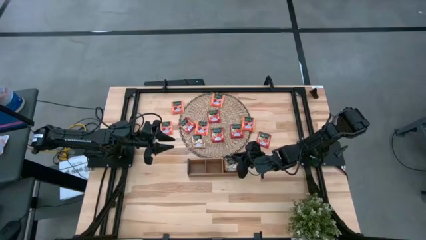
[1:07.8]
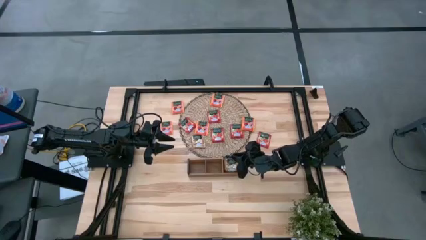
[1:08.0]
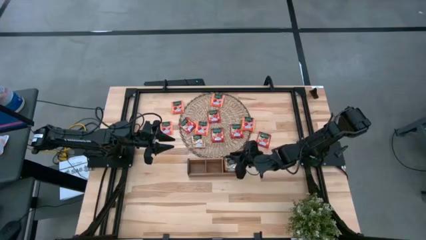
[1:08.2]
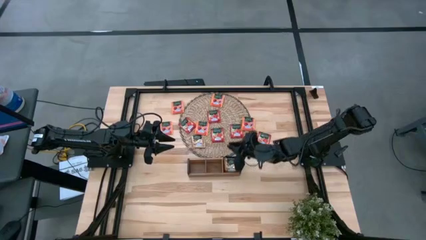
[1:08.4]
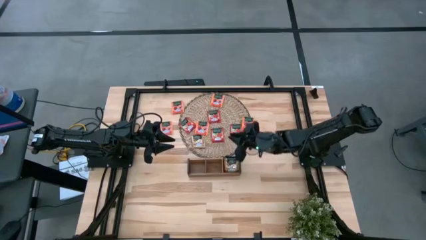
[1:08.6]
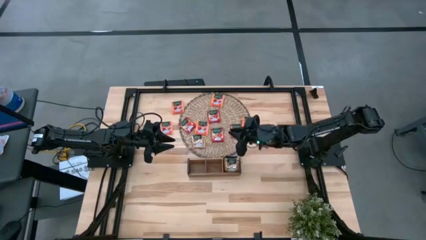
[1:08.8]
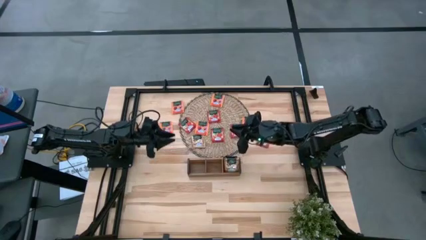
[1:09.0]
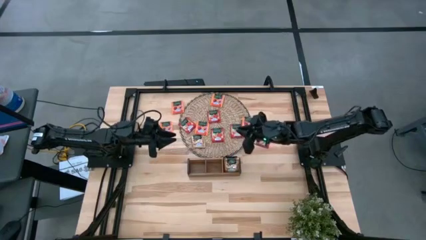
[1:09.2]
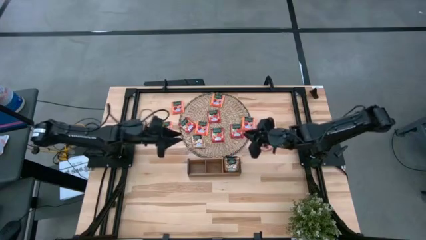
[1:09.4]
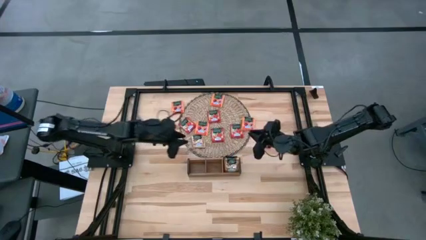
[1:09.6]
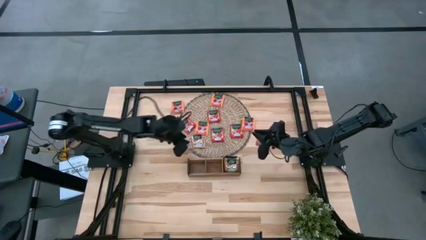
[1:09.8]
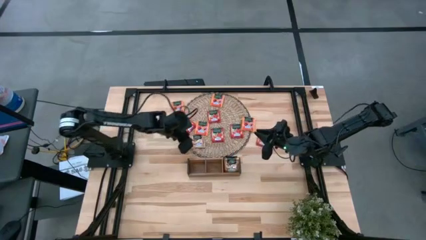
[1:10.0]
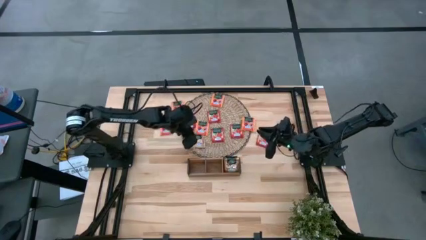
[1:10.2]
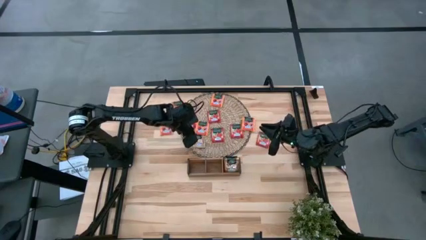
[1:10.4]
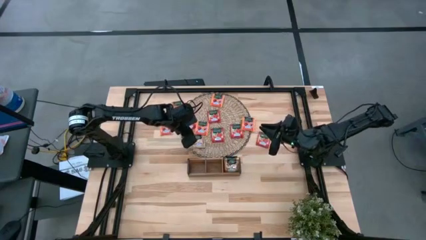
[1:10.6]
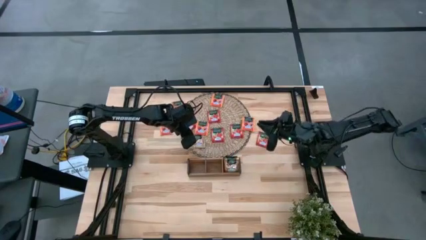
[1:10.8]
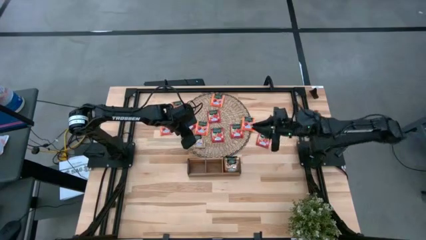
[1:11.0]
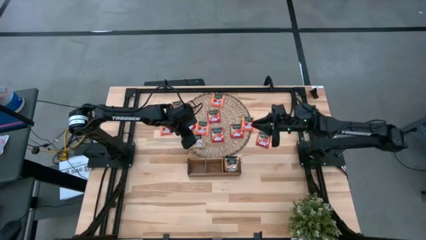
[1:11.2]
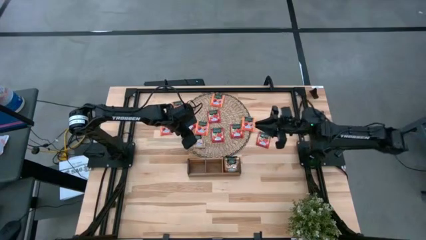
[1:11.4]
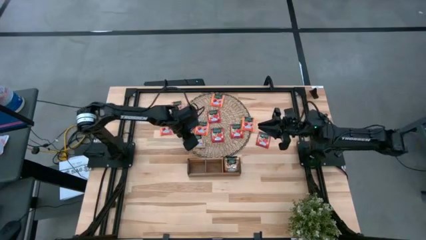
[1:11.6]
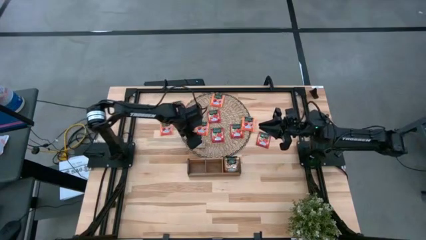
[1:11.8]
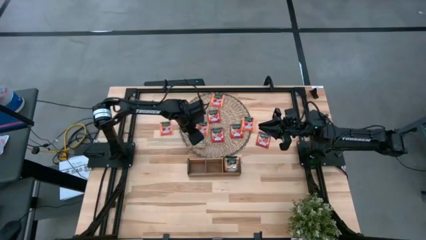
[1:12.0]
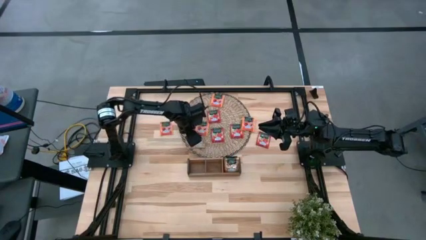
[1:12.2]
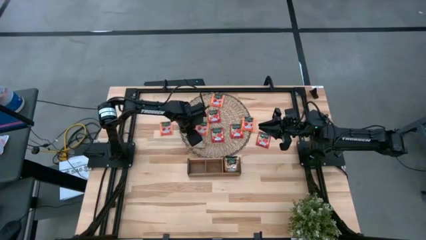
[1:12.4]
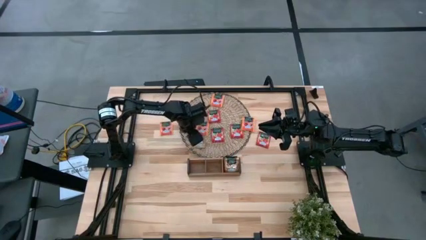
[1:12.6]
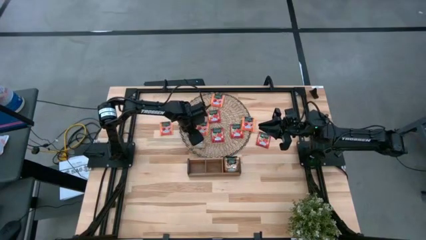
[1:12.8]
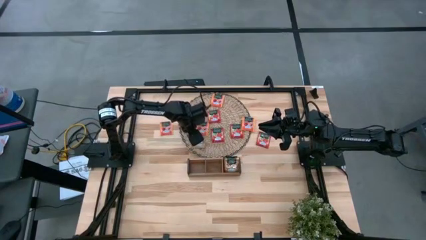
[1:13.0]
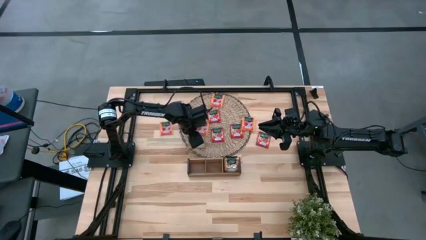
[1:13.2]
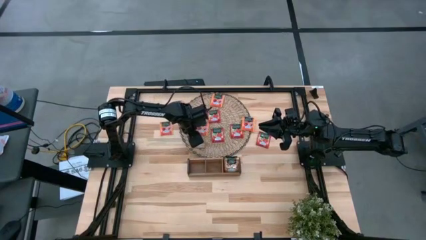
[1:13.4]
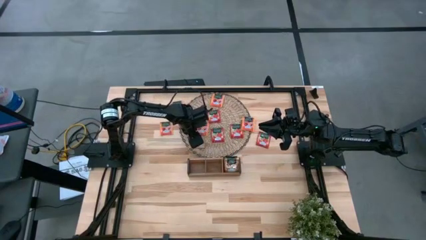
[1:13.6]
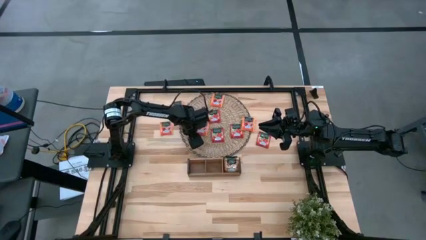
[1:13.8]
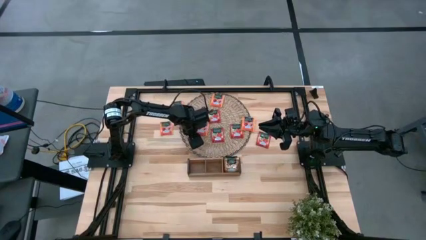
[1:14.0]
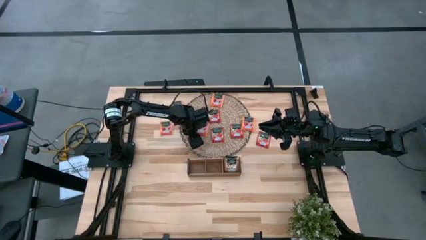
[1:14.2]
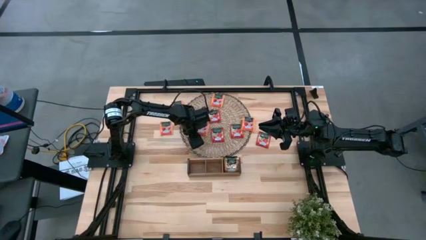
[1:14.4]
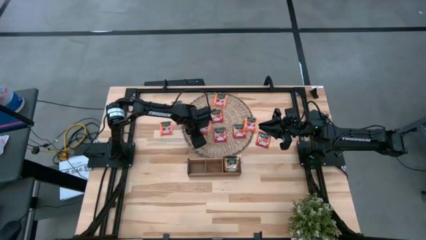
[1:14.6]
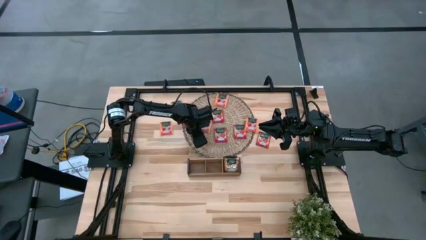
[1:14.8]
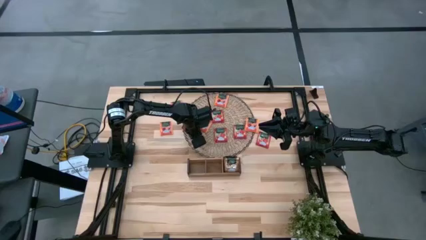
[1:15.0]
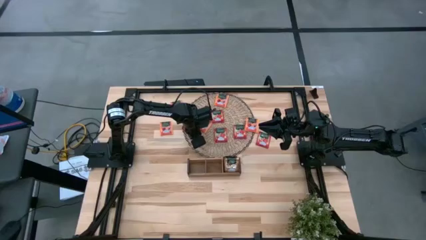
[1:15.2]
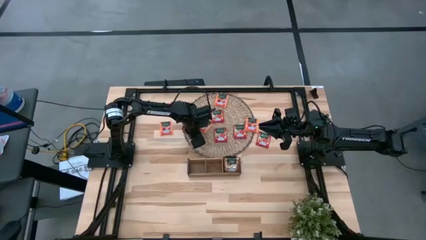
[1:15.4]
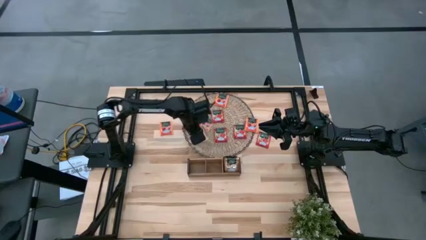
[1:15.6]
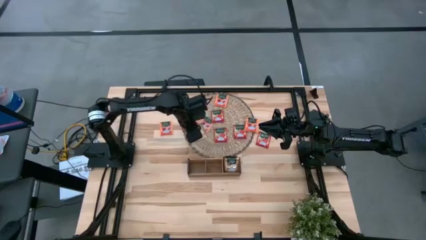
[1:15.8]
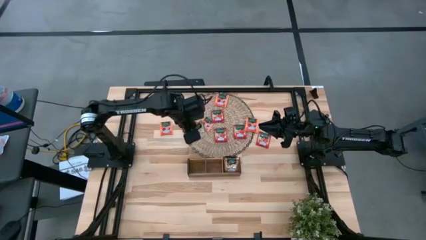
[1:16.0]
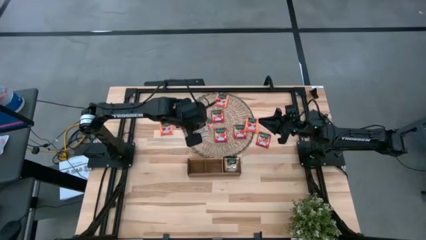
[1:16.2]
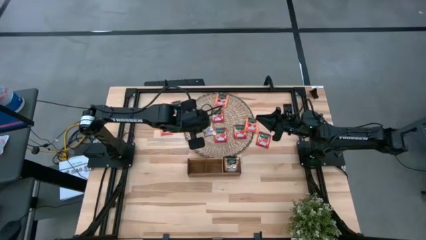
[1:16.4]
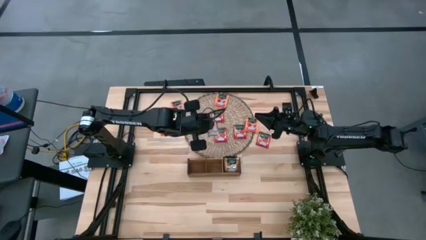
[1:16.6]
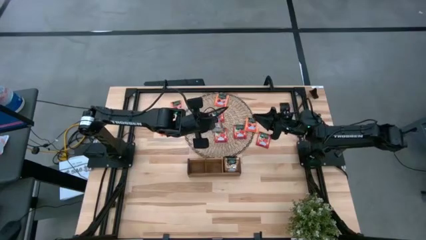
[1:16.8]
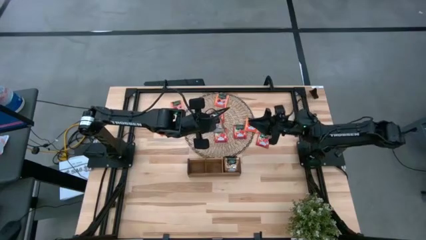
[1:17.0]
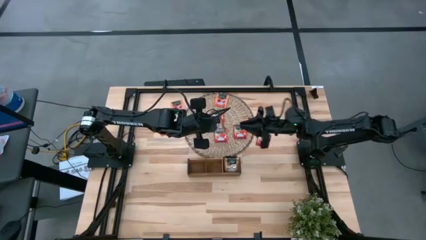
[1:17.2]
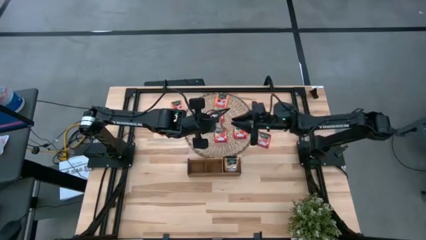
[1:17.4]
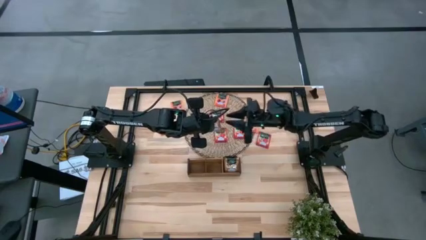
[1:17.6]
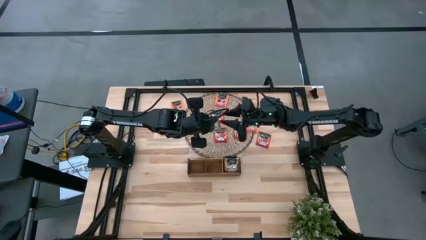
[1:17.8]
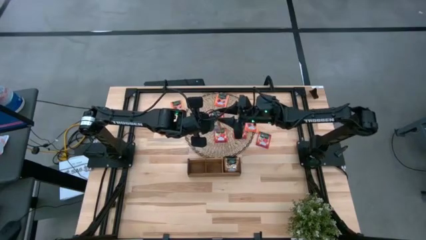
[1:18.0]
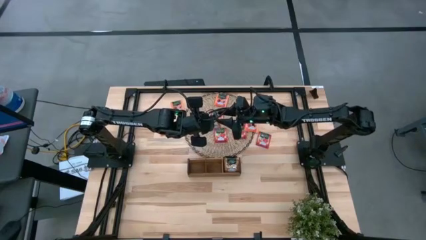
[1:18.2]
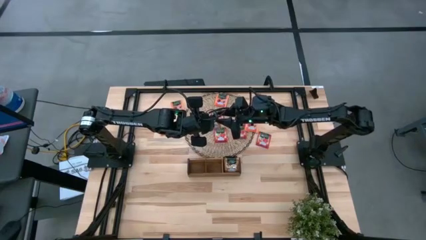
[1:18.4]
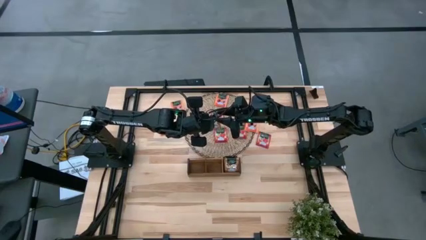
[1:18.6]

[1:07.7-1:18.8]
Task: Pick & Place Tea
Put the gold tea bag into the right section of the wooden organizer
